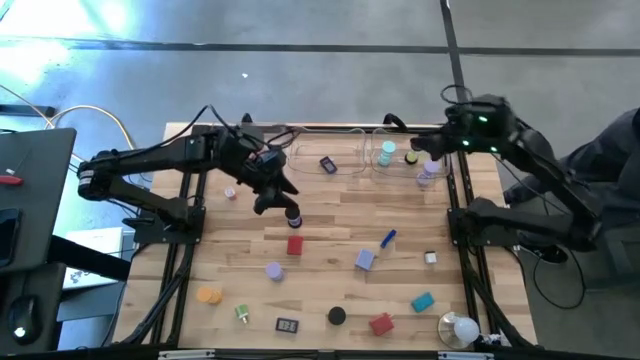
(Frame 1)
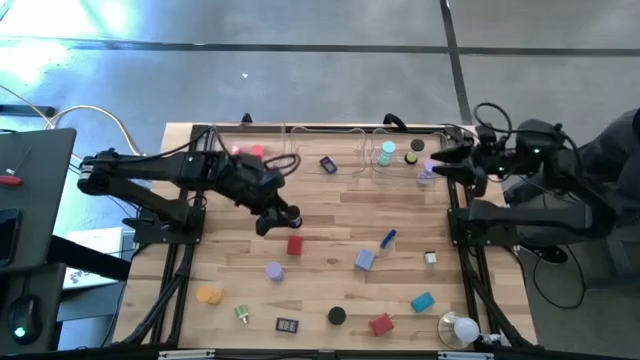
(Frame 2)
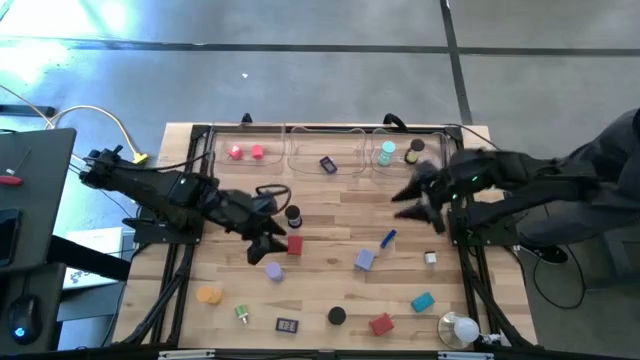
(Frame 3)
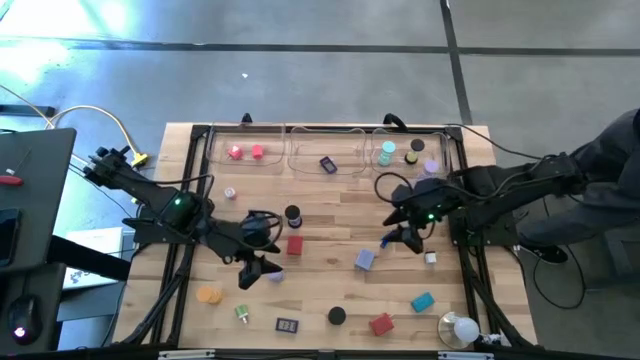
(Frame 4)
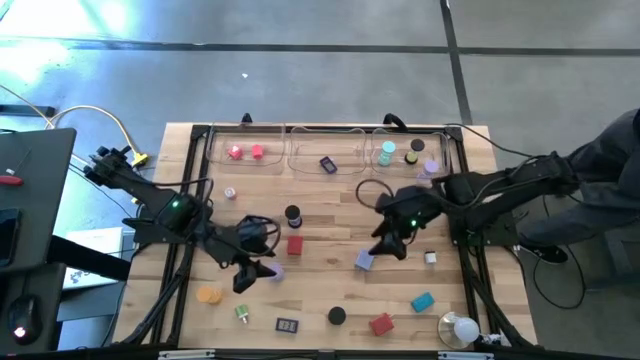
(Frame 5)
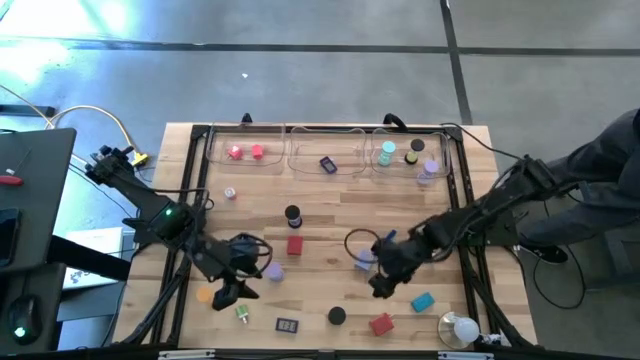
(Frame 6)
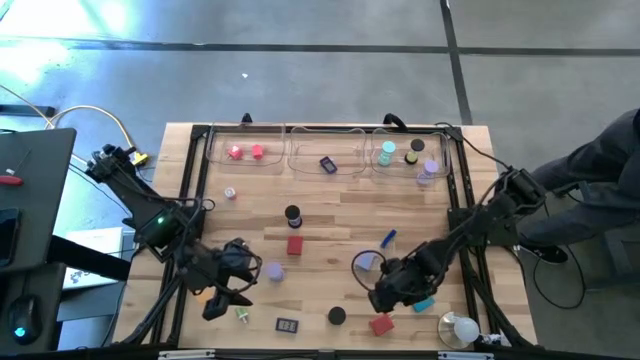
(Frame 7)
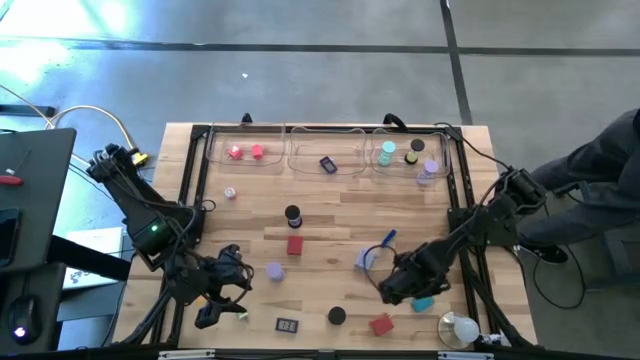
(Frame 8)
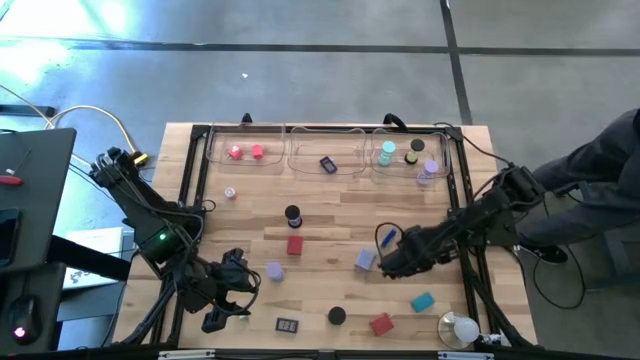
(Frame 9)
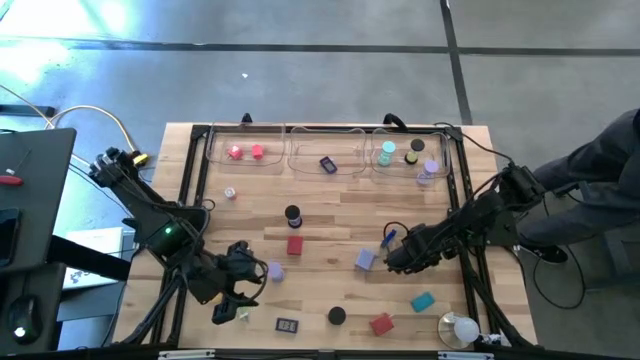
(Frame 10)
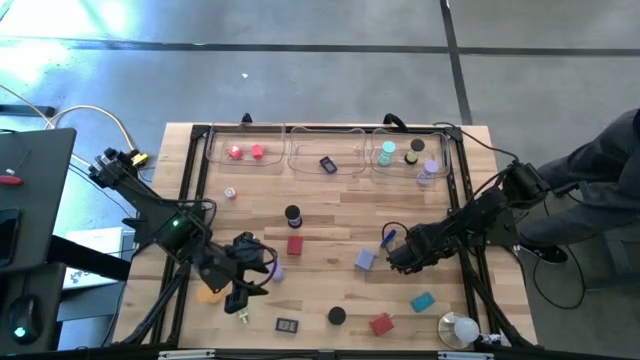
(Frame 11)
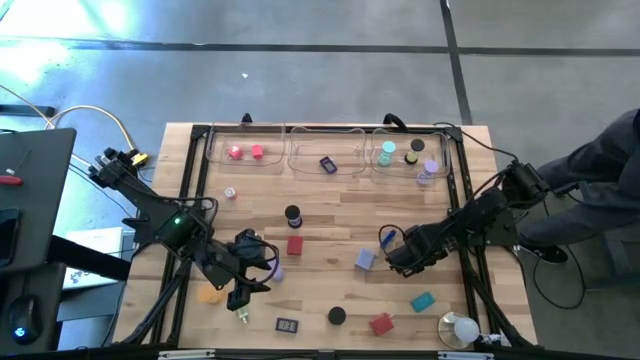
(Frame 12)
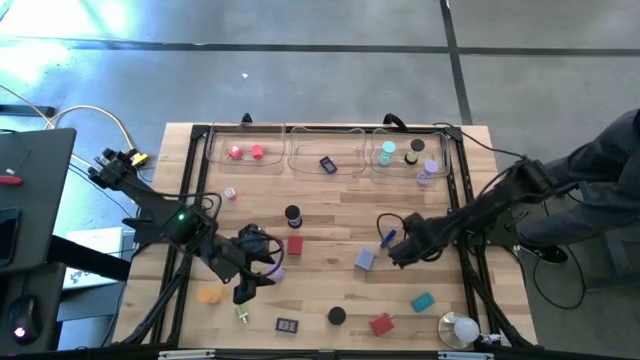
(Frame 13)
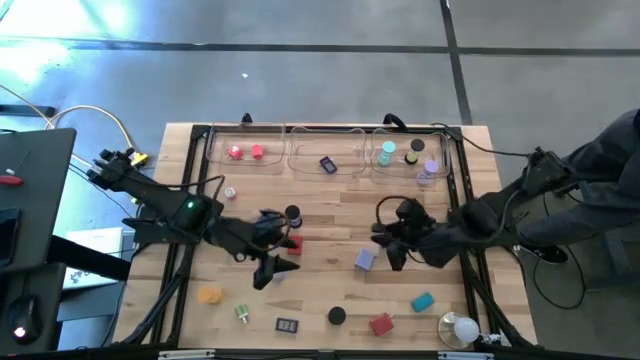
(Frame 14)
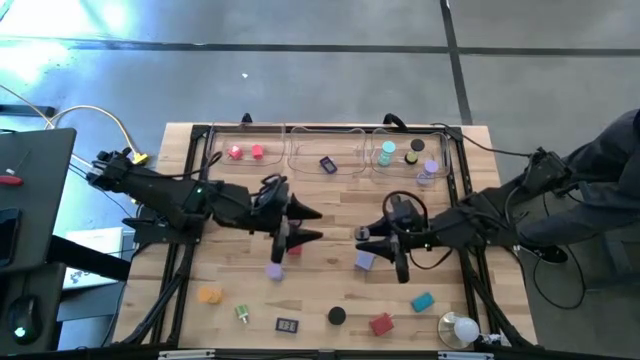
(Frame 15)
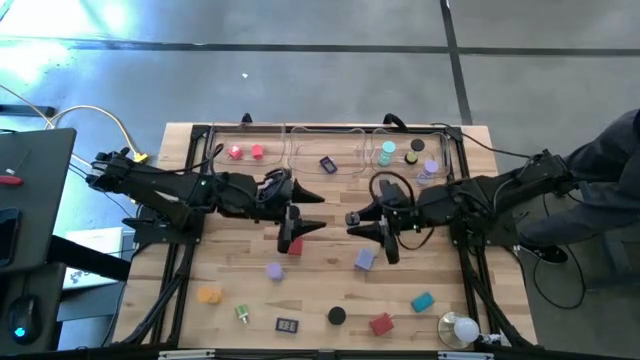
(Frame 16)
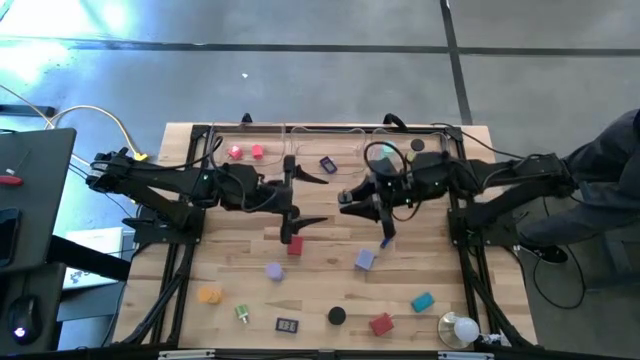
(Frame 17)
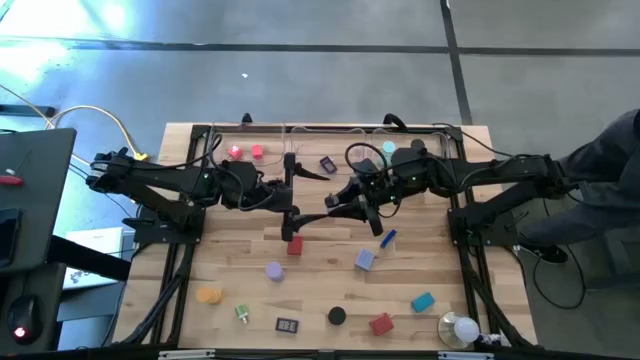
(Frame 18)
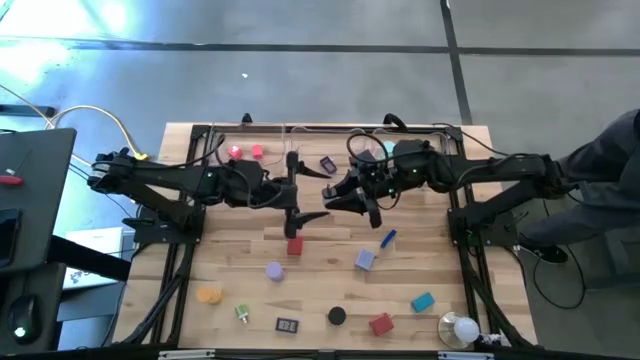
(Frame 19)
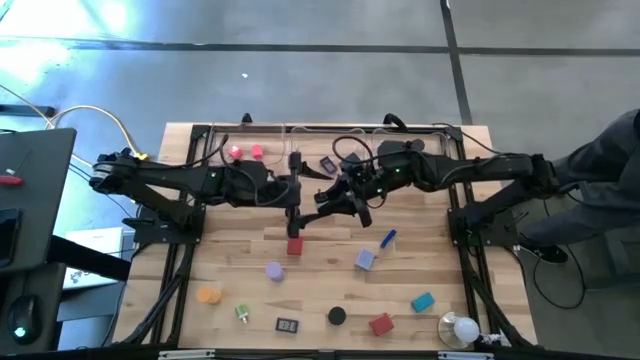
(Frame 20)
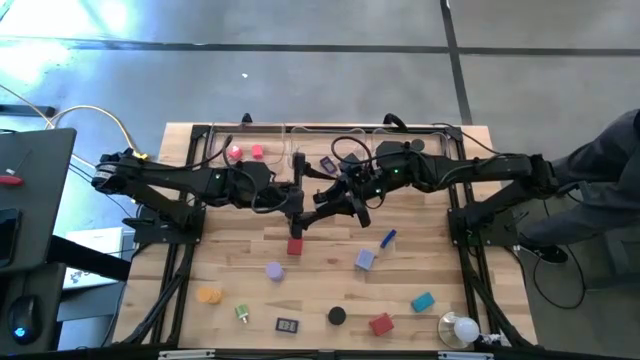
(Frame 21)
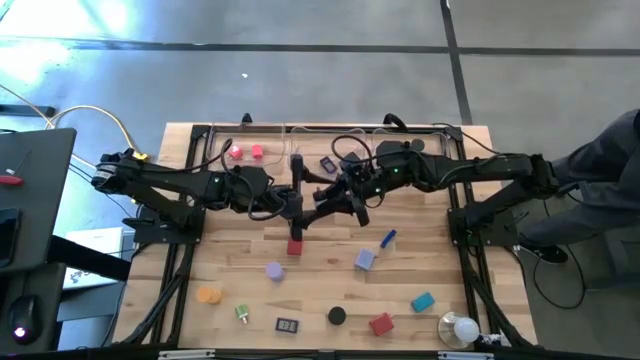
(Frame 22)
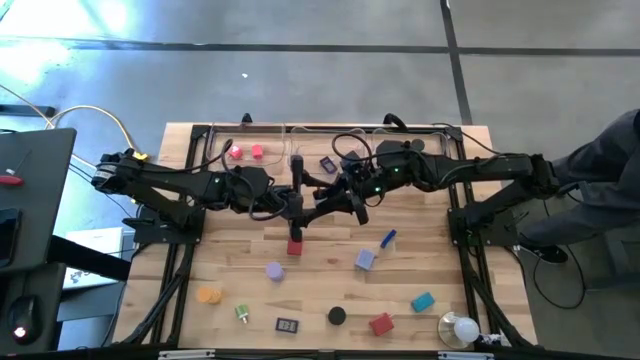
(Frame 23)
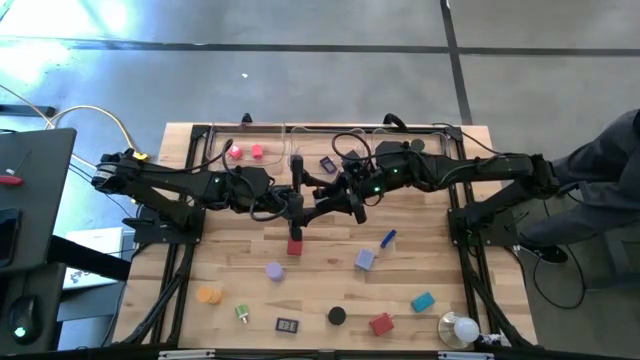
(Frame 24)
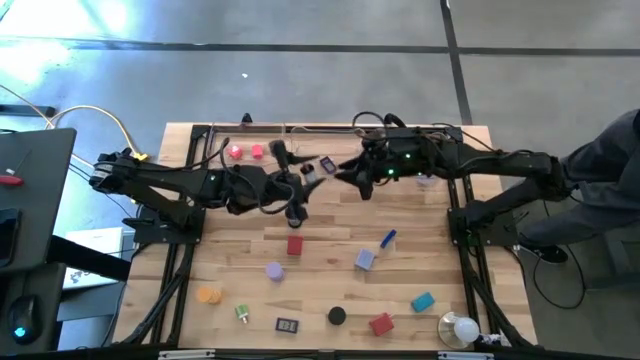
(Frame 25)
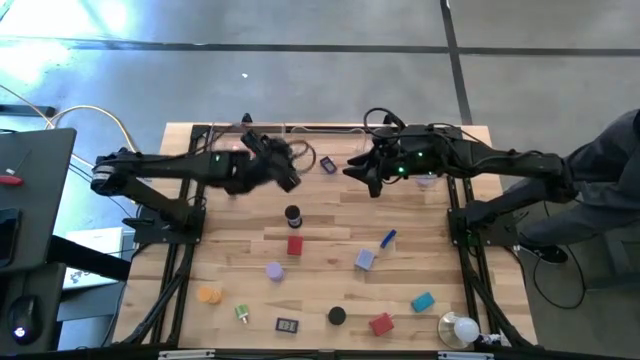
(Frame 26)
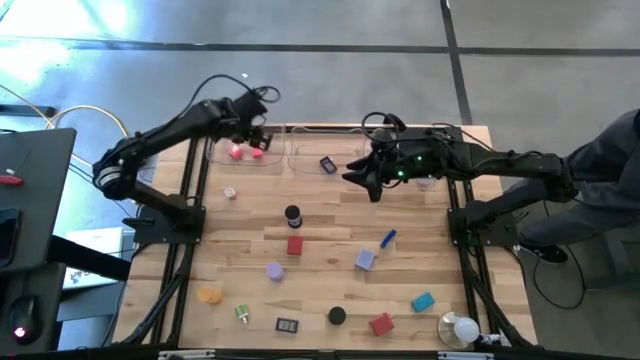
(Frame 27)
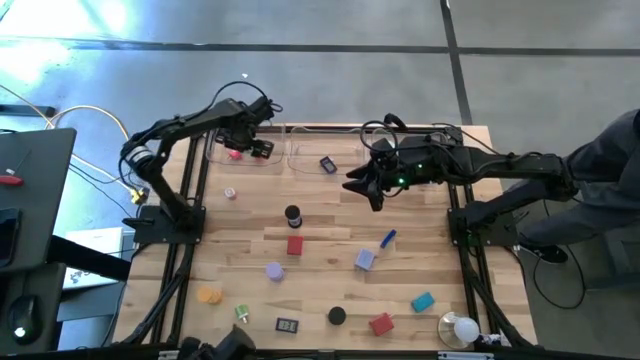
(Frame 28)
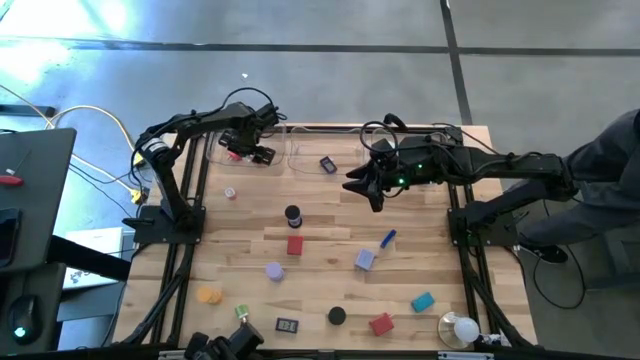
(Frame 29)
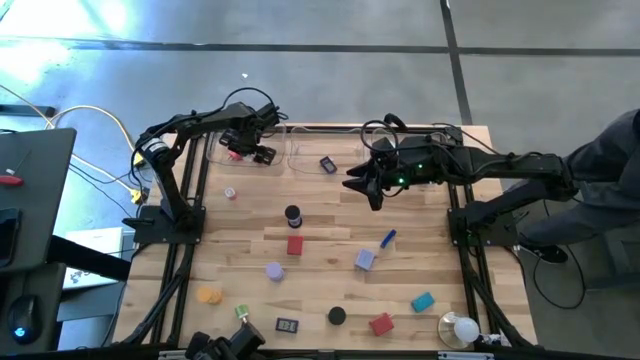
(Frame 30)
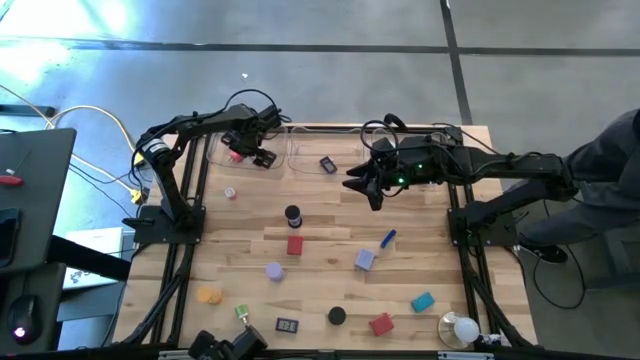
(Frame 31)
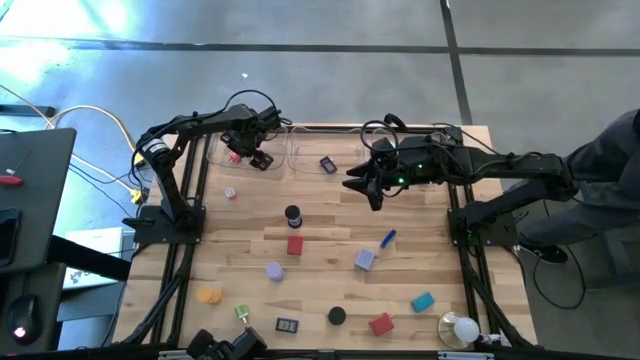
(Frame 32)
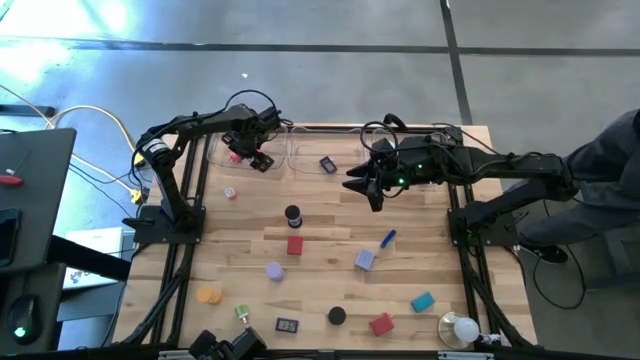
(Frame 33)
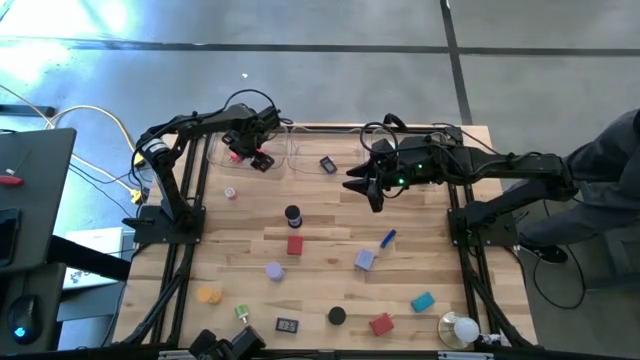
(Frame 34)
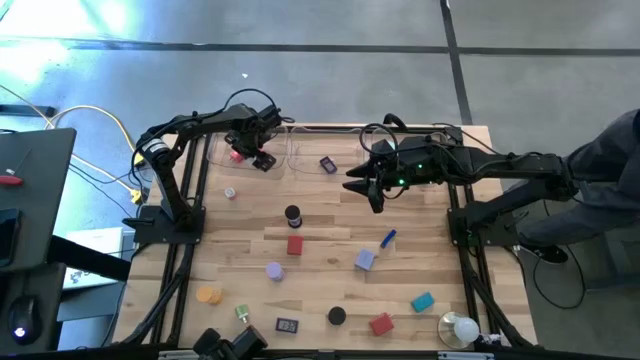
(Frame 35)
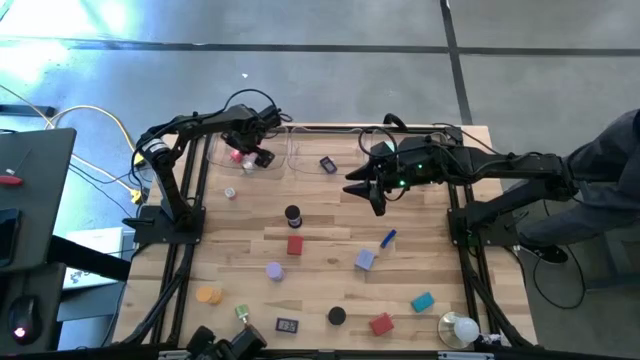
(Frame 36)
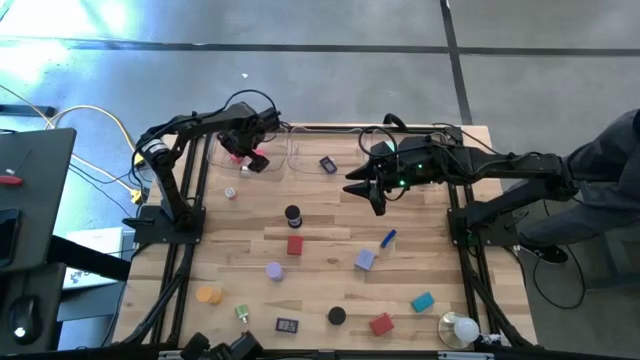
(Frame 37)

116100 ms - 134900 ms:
Task: Pick & Place Office items
Put the white charger adapter into the left transparent bin

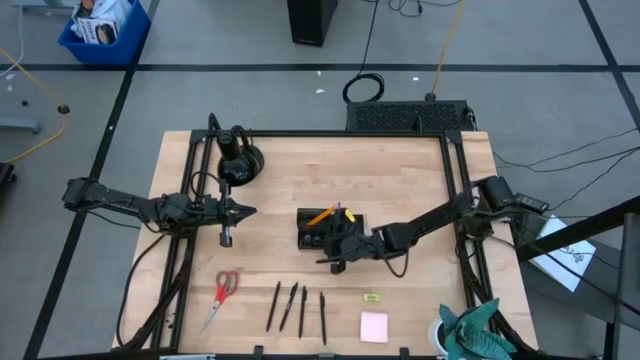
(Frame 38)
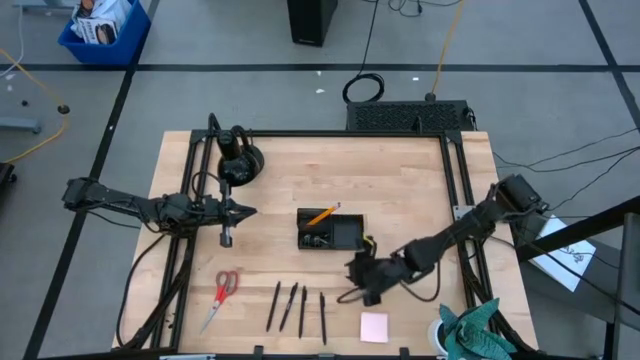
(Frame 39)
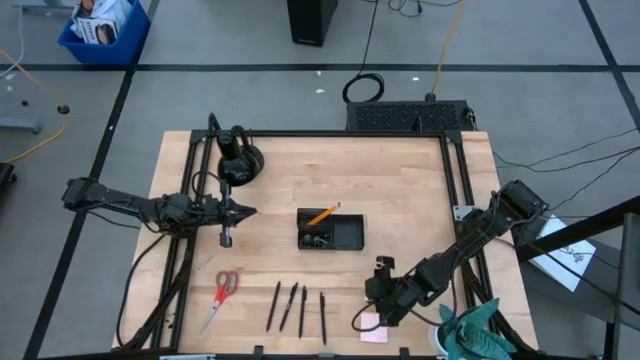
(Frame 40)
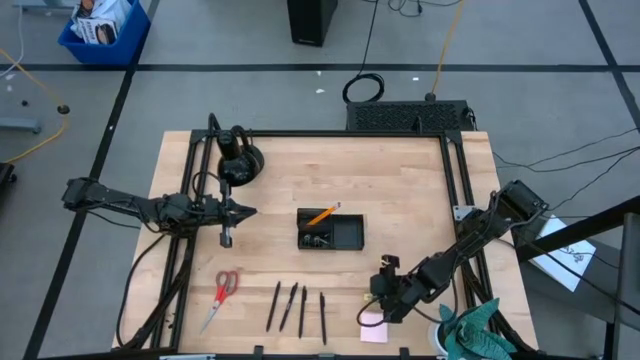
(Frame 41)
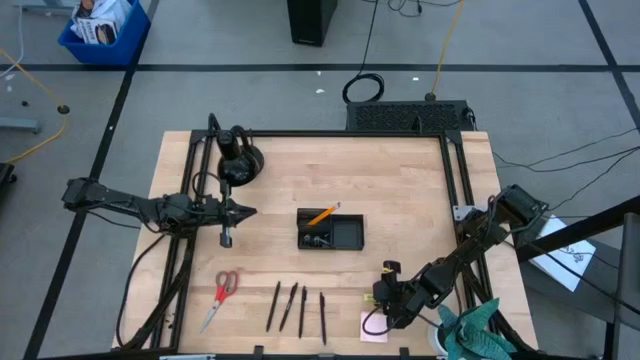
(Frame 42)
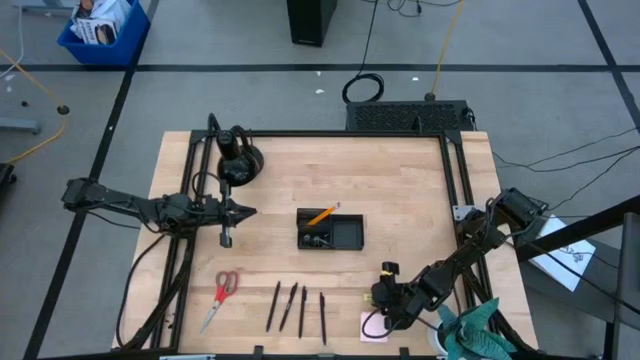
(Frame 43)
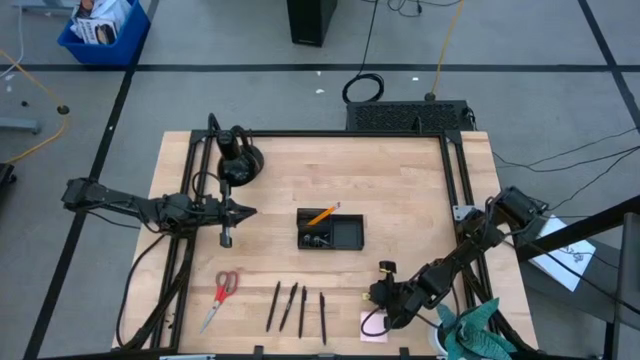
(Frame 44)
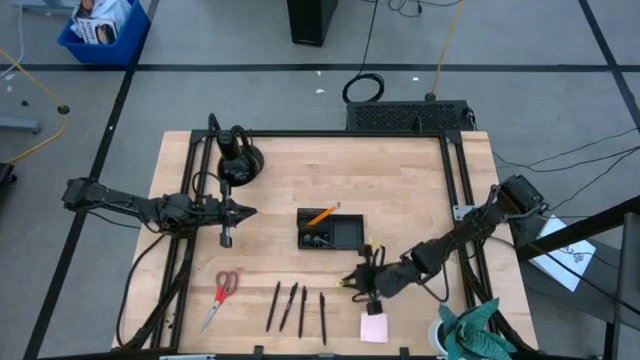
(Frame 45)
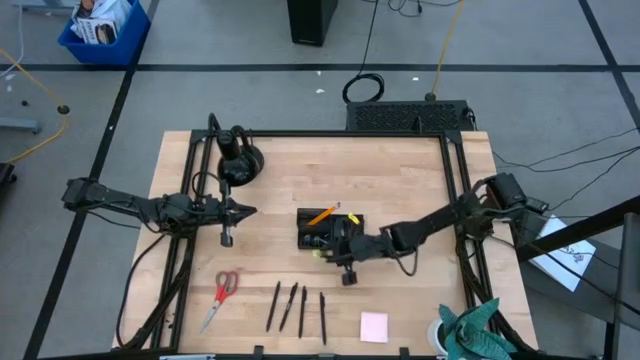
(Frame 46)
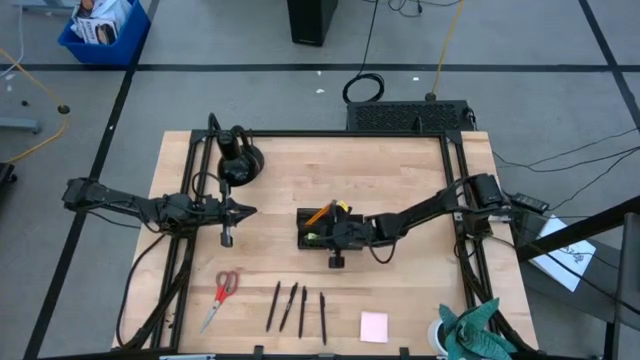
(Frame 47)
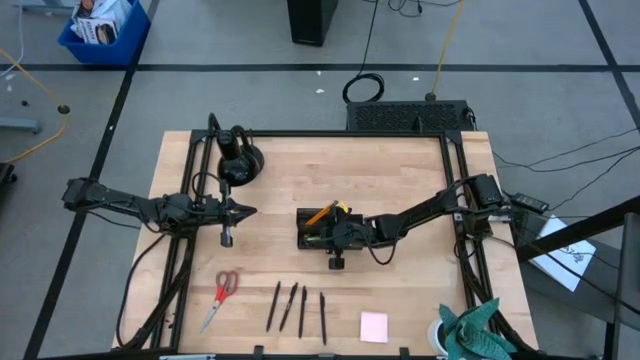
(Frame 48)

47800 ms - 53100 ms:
Task: Pick and place office supplies into organizer
Put the yellow eraser into the black desk organizer
